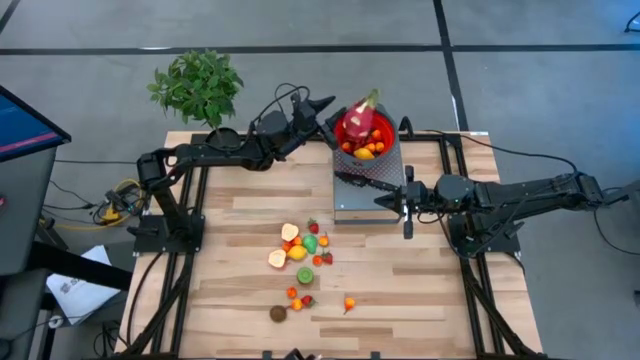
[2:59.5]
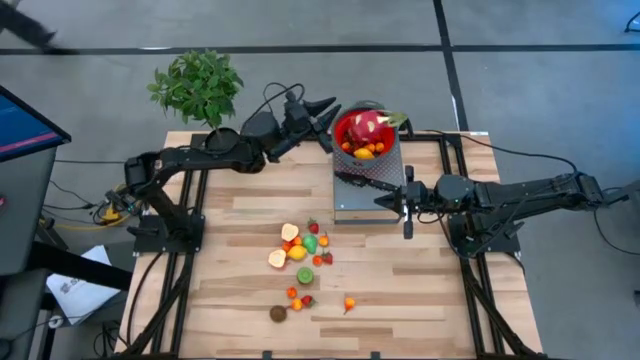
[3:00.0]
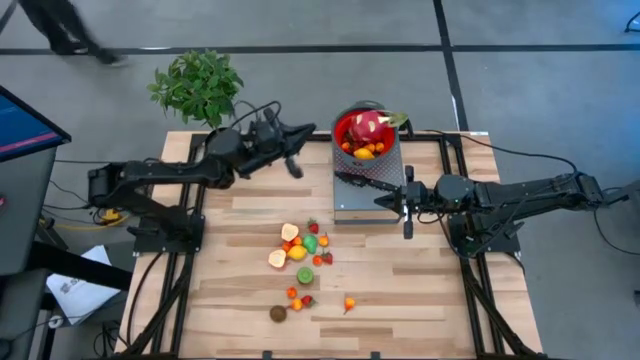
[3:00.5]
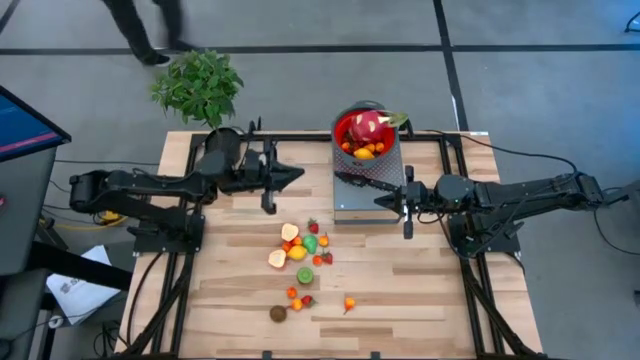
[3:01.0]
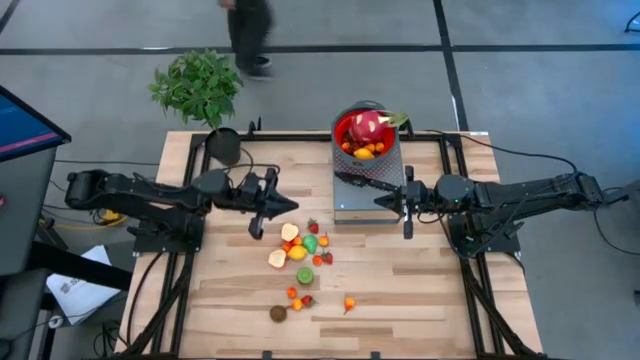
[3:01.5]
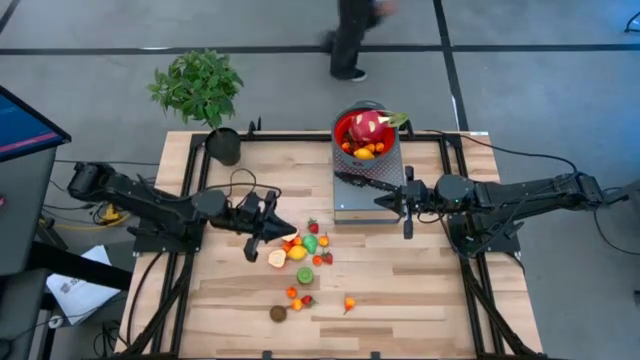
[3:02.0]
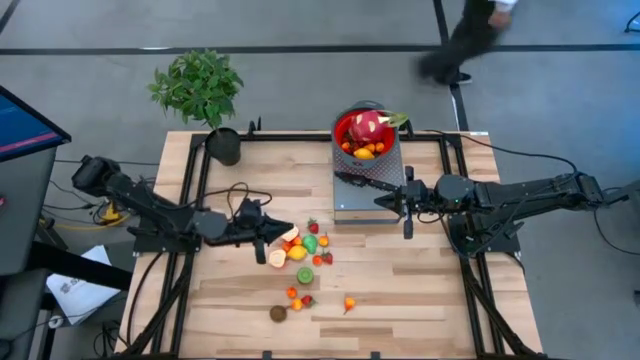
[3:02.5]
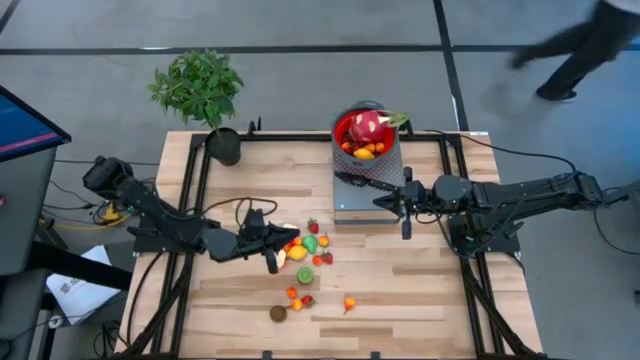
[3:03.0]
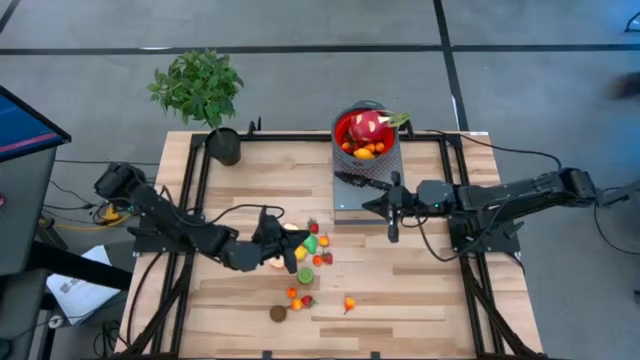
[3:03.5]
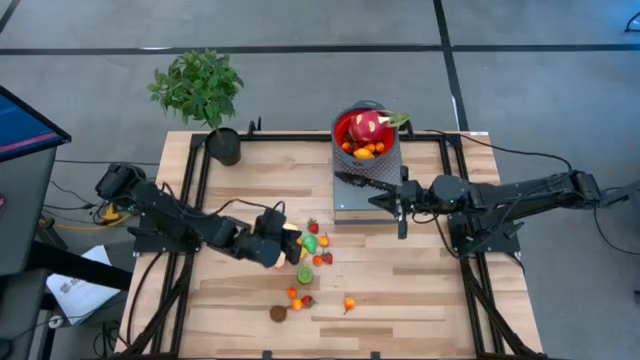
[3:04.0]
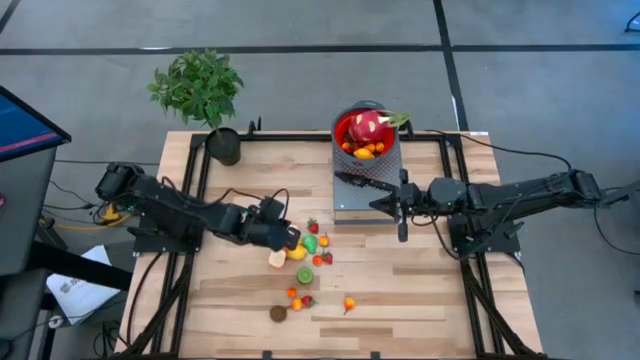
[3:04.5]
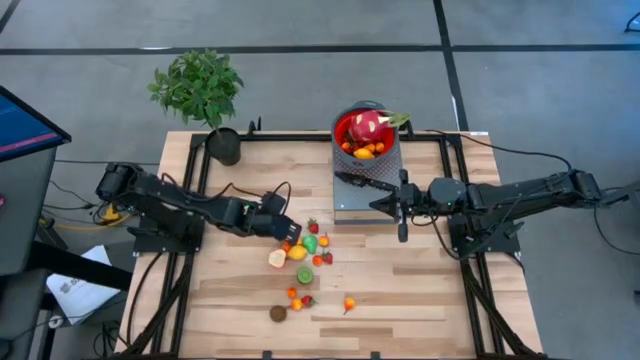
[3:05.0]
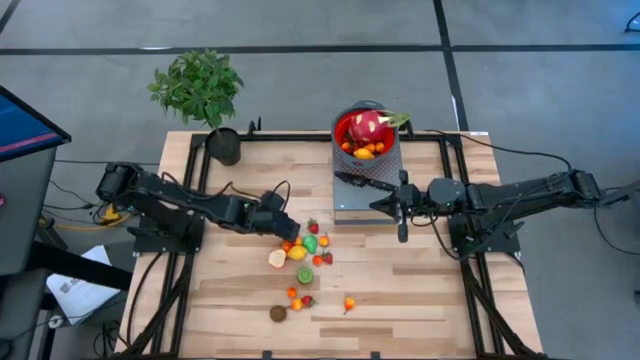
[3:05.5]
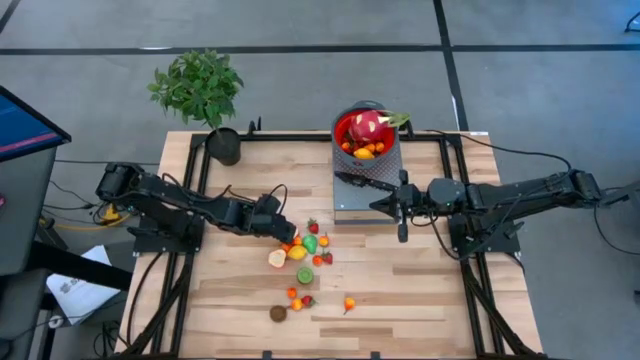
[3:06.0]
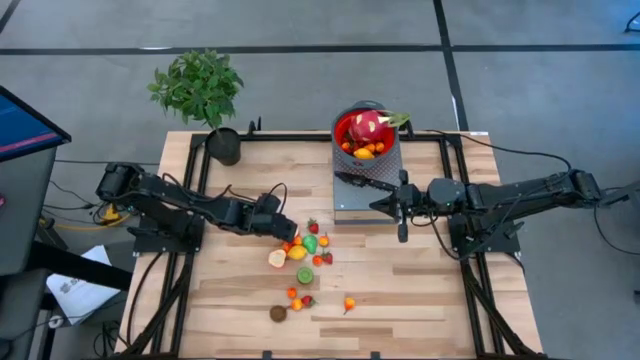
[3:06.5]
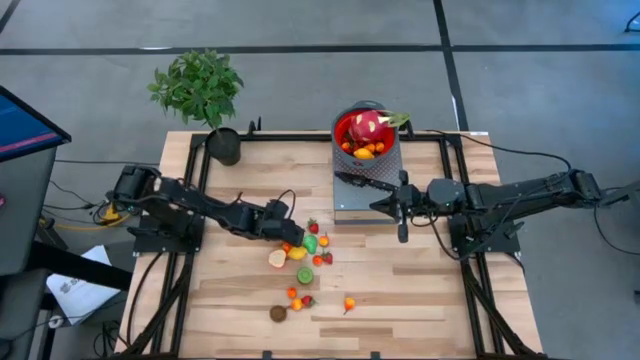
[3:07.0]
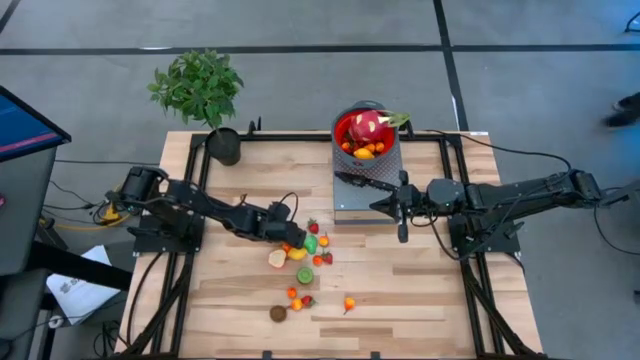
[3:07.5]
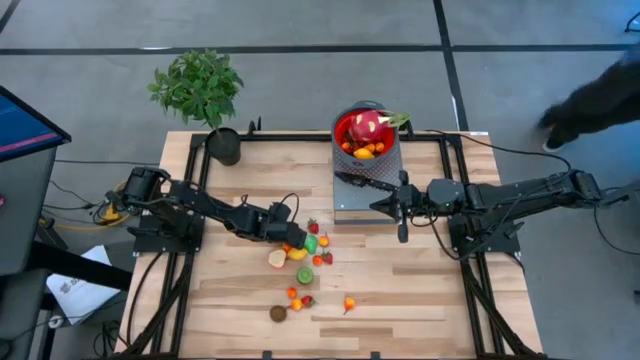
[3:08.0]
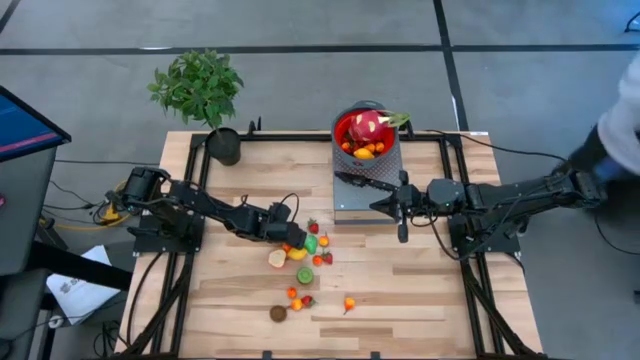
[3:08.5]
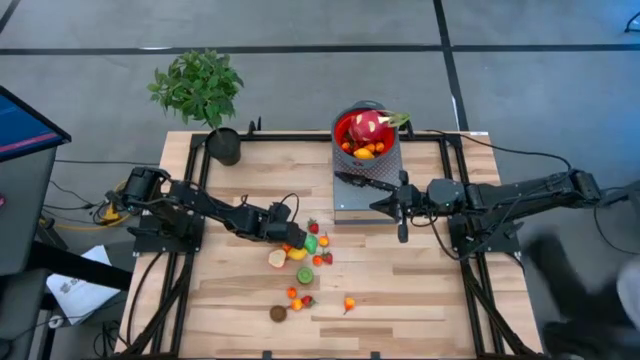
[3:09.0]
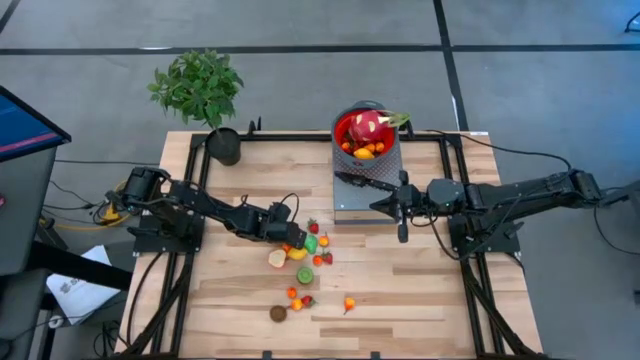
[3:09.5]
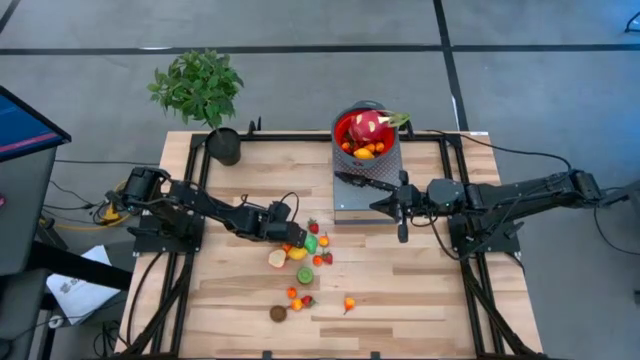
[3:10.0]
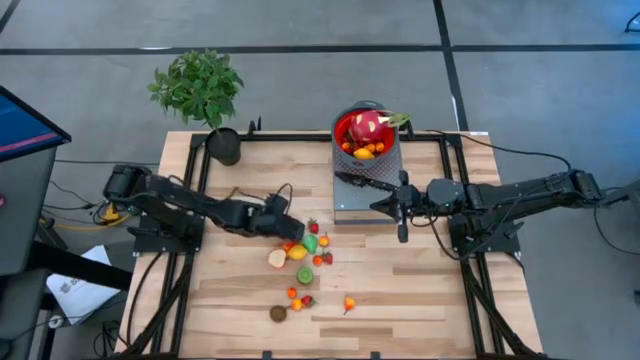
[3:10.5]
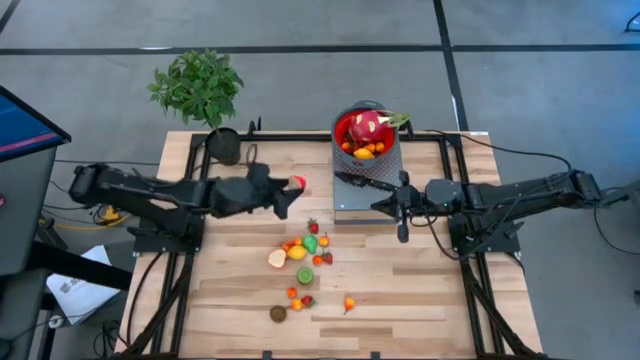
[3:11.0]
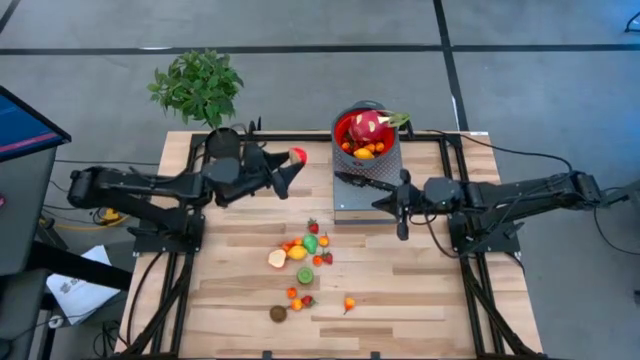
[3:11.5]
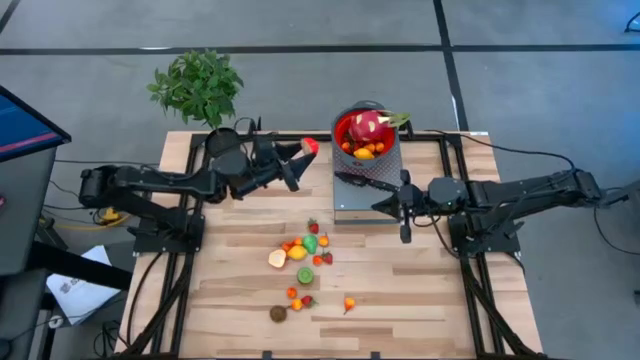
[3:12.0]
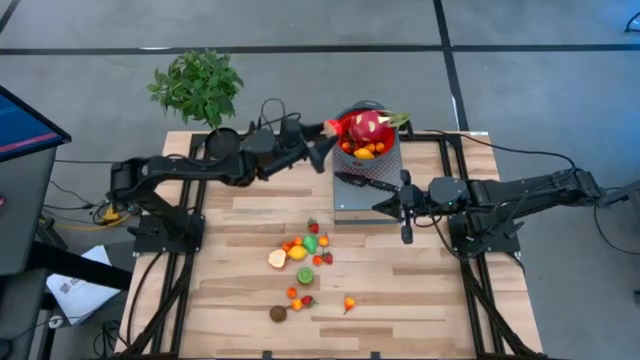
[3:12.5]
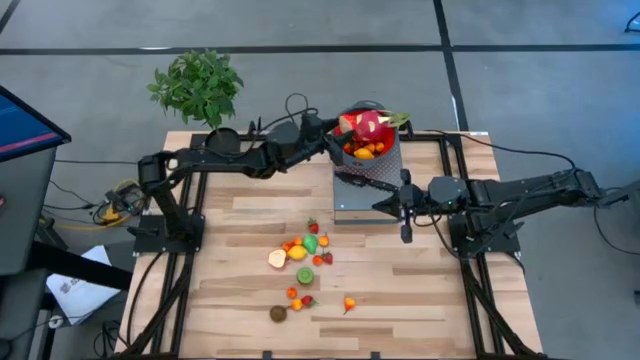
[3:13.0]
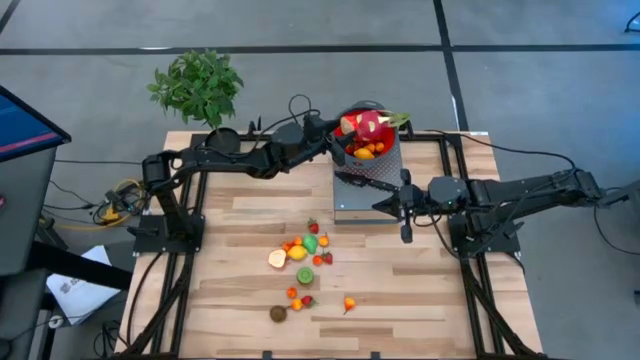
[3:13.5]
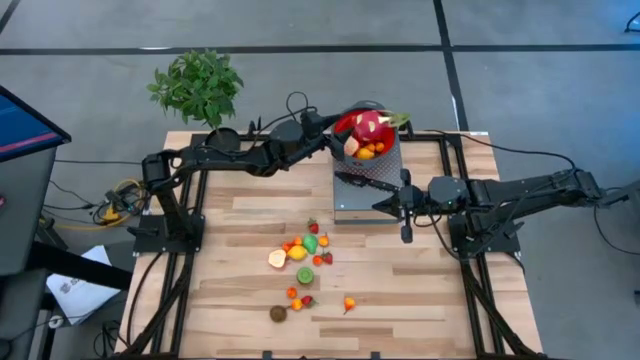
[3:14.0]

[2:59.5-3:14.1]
Task: Pick & Place Fruit
Put the red half apple into the red colander on the shelf

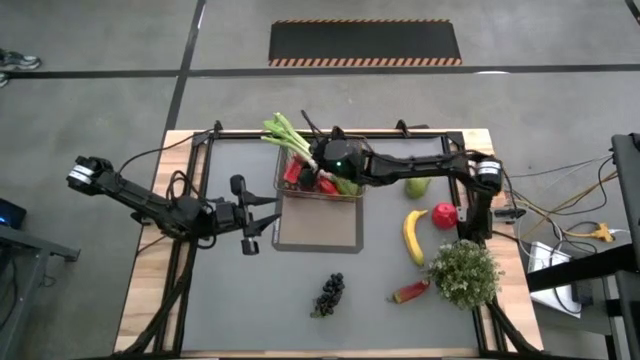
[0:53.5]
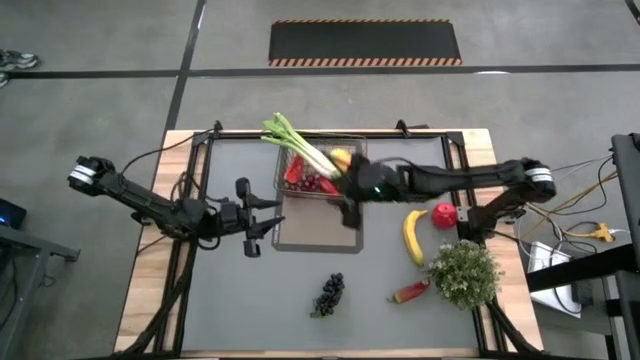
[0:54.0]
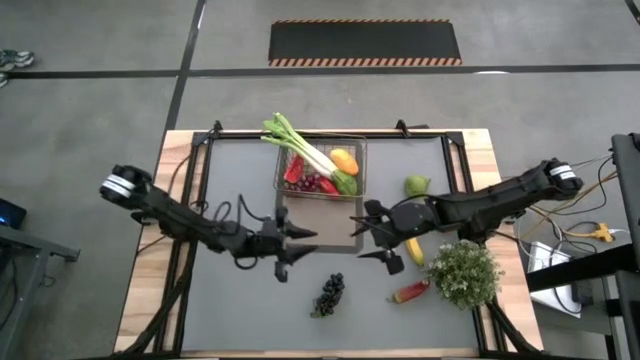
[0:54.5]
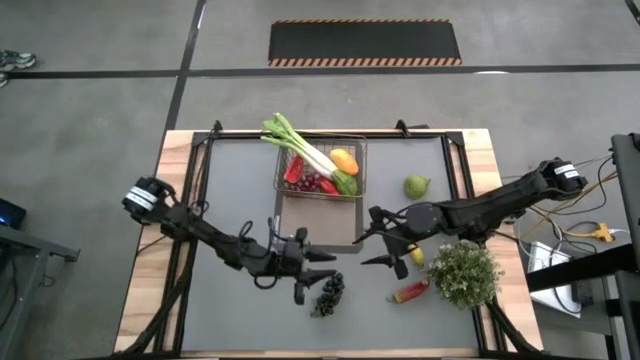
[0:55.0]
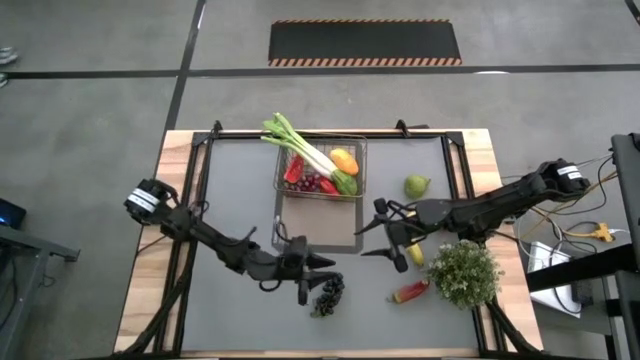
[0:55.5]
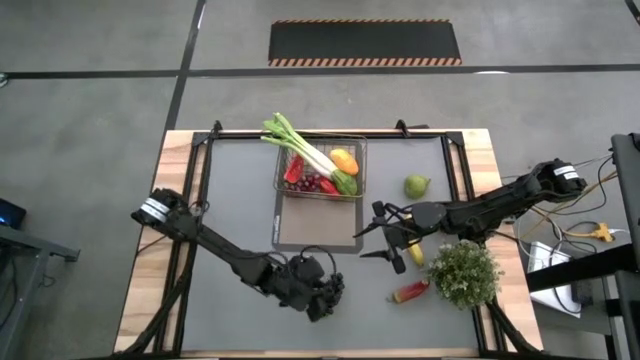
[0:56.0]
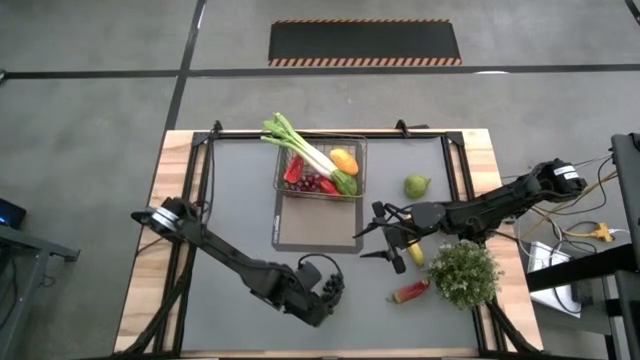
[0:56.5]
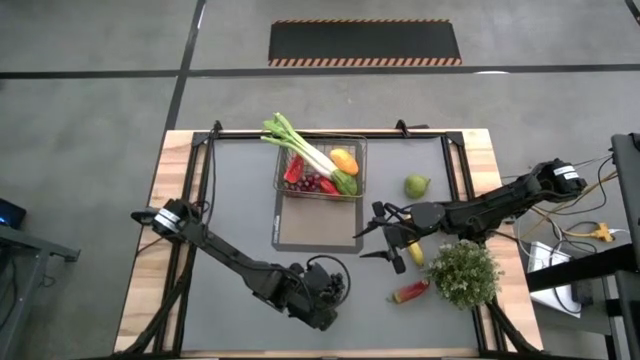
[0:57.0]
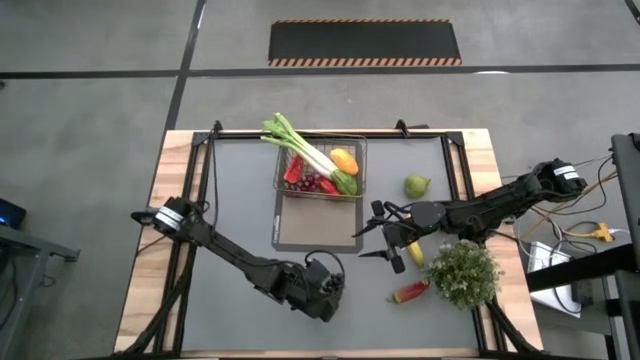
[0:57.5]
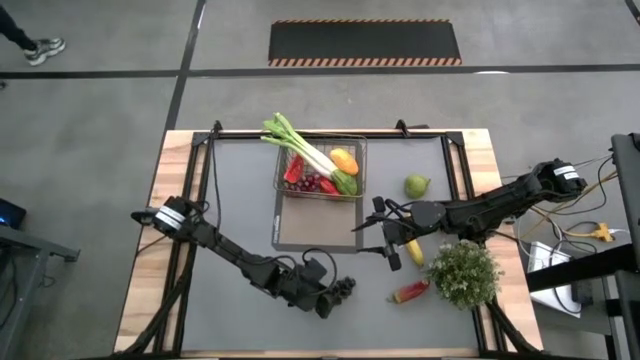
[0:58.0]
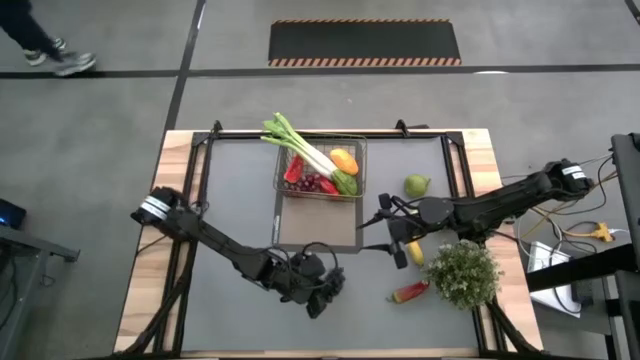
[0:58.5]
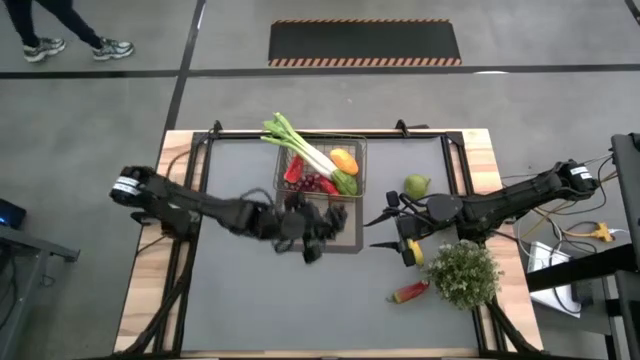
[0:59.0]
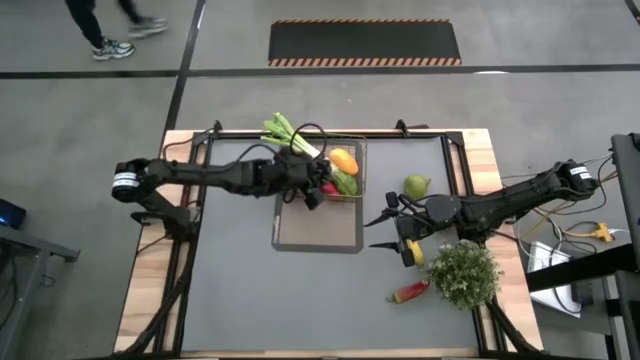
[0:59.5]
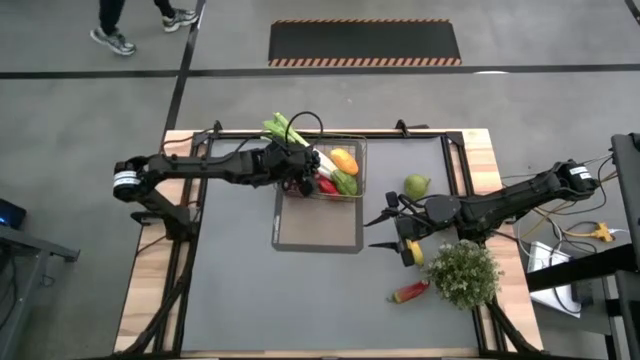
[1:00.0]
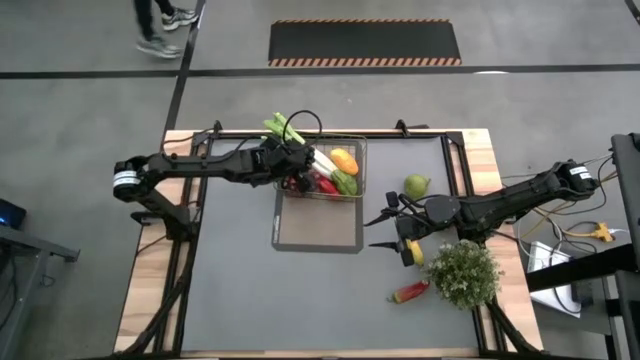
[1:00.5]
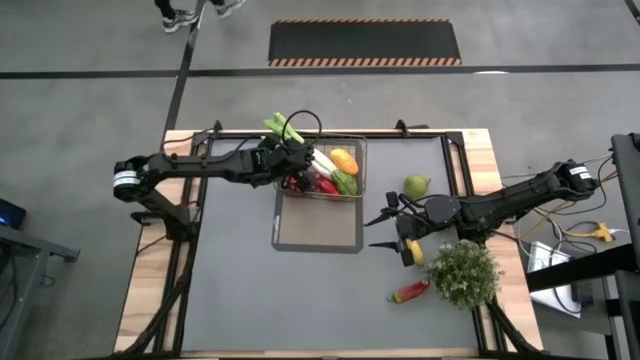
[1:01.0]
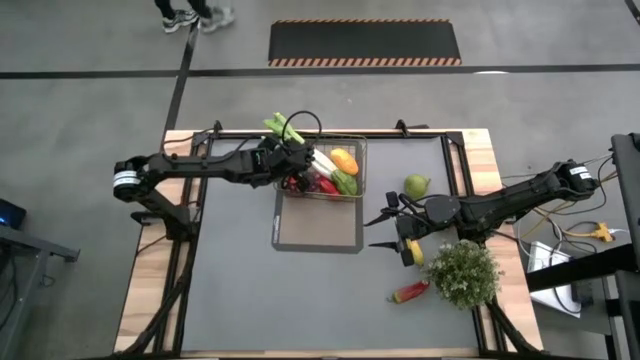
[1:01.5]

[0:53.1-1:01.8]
Task: Build produce basket
Put the black grapes into the wire basket
